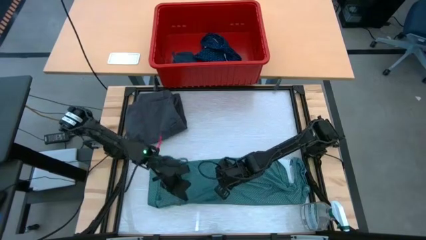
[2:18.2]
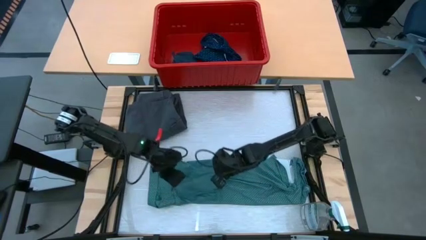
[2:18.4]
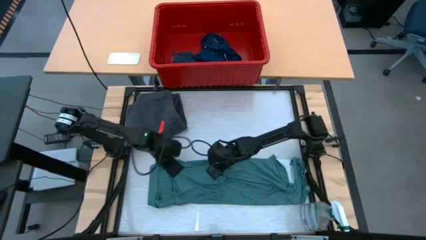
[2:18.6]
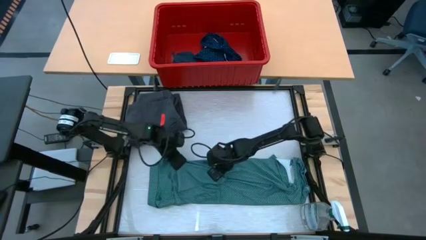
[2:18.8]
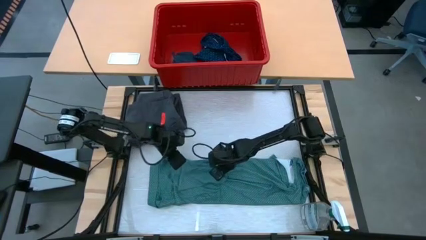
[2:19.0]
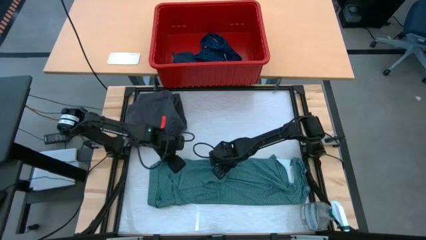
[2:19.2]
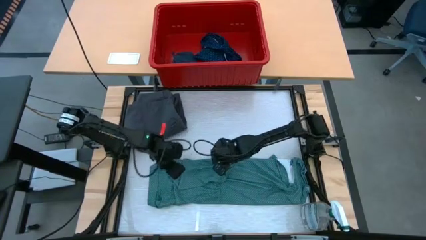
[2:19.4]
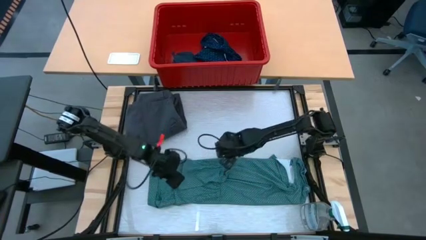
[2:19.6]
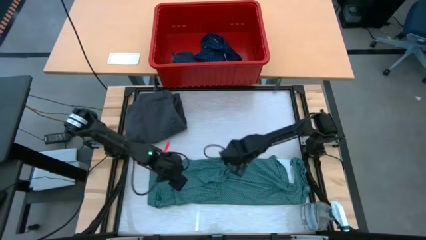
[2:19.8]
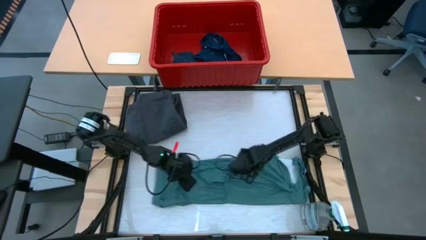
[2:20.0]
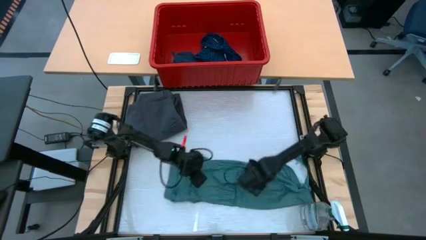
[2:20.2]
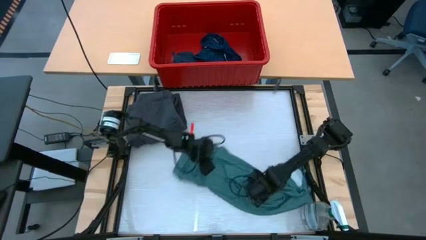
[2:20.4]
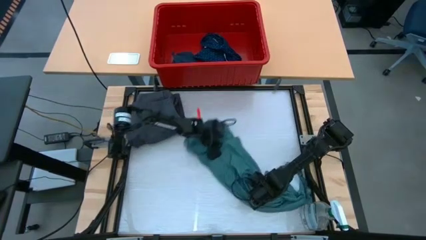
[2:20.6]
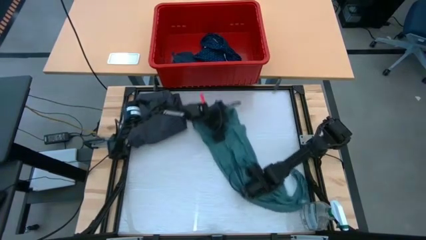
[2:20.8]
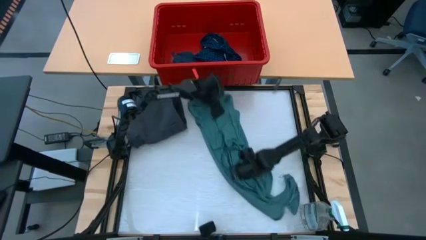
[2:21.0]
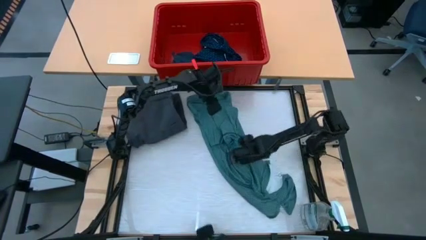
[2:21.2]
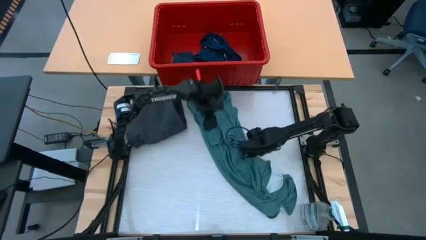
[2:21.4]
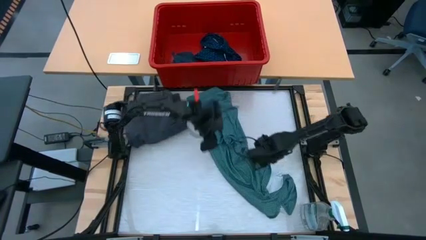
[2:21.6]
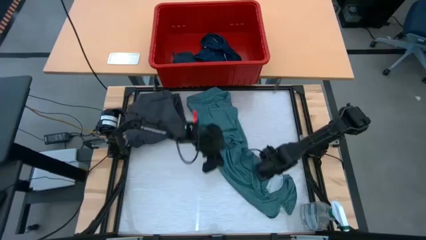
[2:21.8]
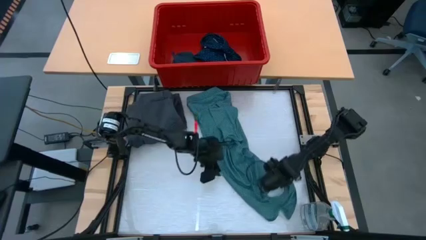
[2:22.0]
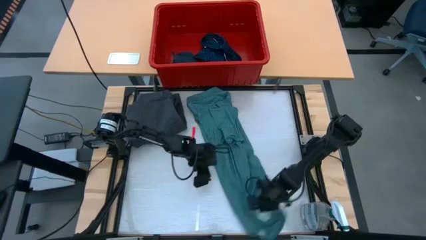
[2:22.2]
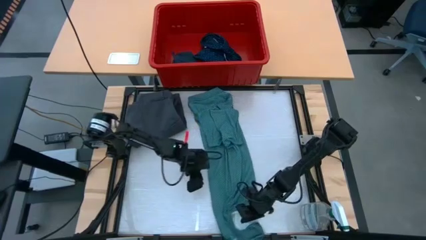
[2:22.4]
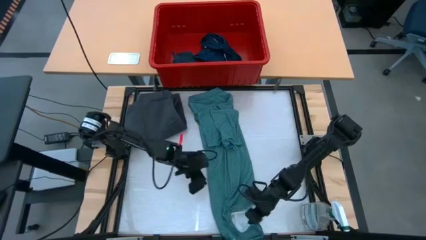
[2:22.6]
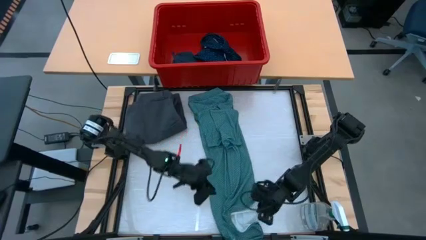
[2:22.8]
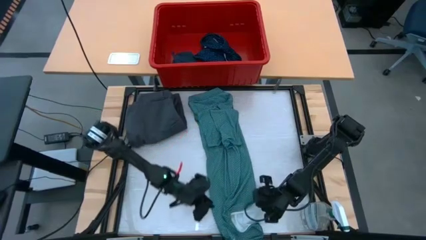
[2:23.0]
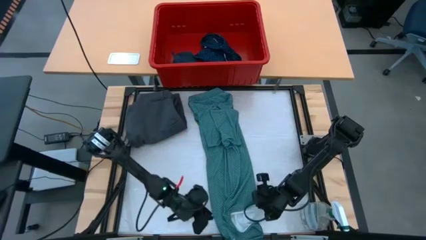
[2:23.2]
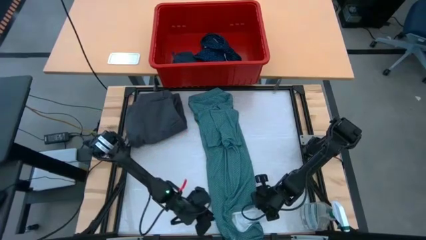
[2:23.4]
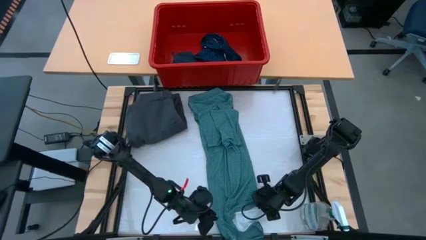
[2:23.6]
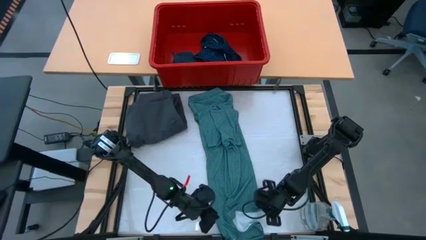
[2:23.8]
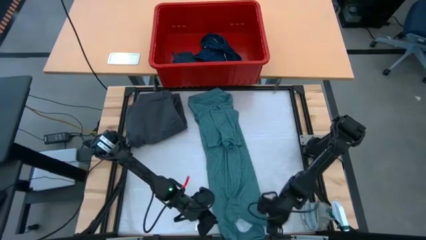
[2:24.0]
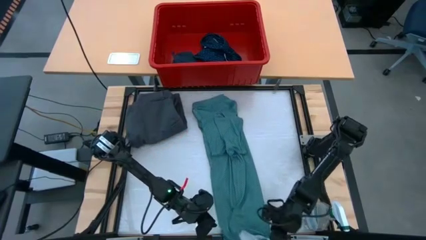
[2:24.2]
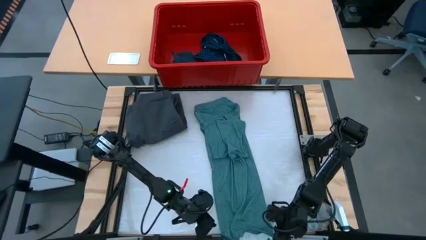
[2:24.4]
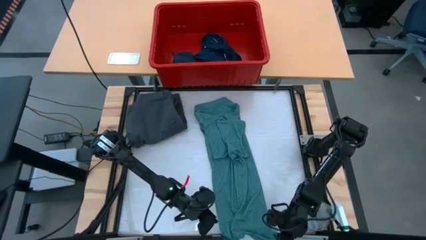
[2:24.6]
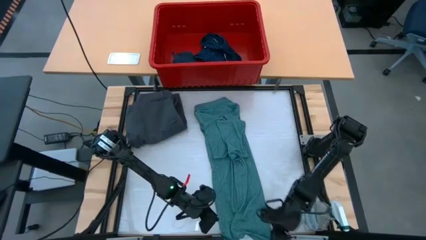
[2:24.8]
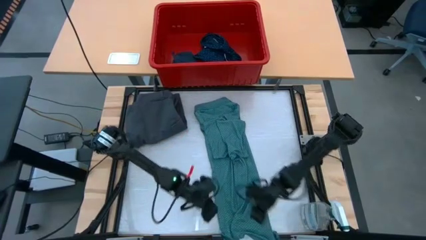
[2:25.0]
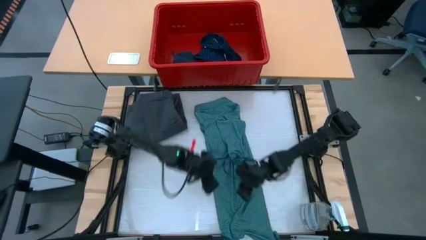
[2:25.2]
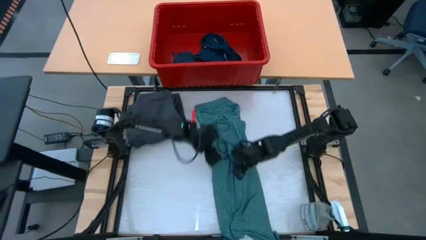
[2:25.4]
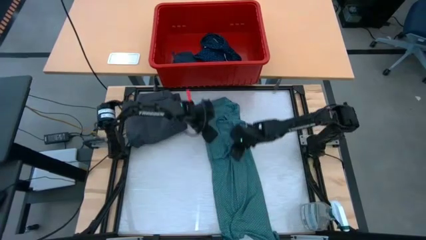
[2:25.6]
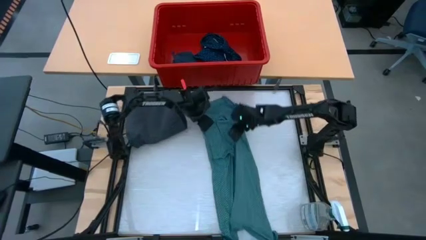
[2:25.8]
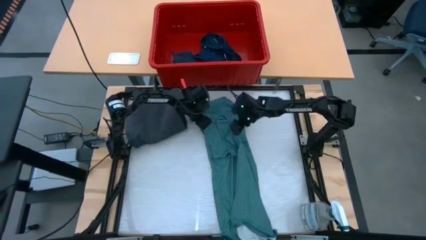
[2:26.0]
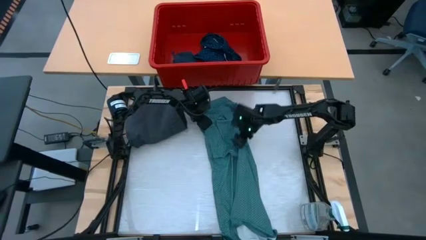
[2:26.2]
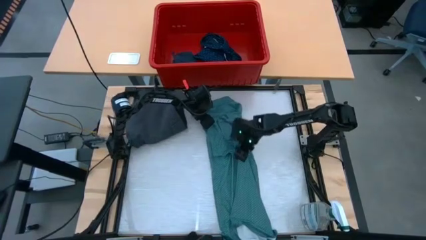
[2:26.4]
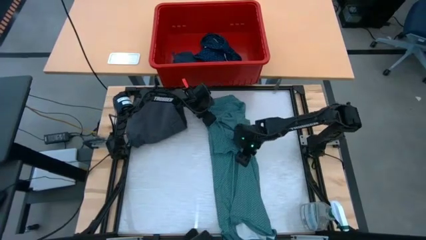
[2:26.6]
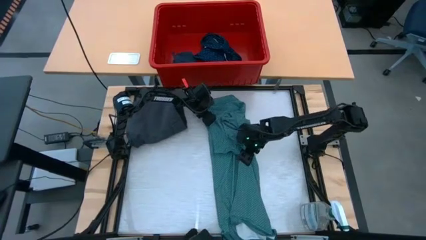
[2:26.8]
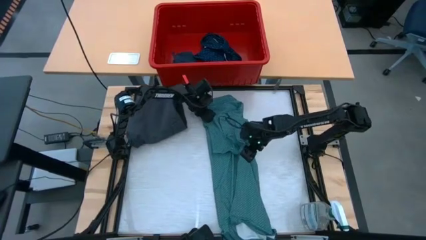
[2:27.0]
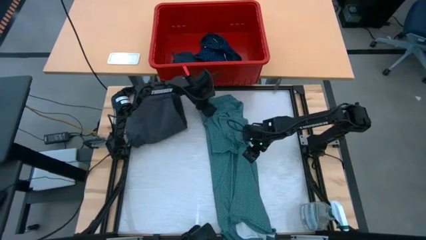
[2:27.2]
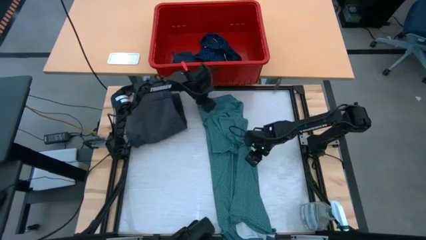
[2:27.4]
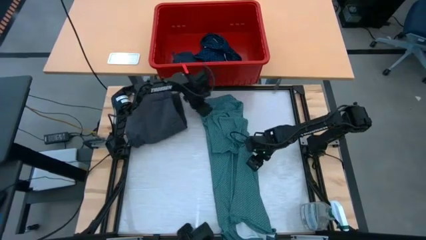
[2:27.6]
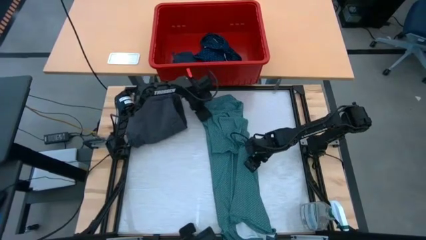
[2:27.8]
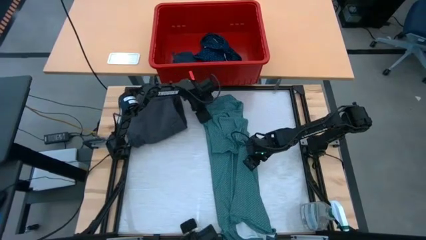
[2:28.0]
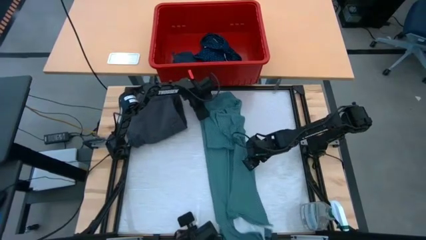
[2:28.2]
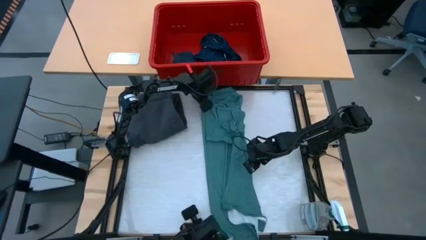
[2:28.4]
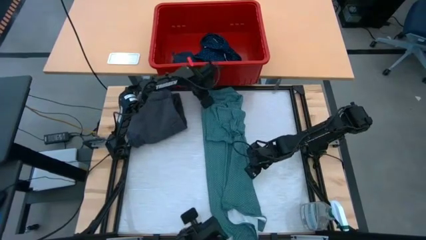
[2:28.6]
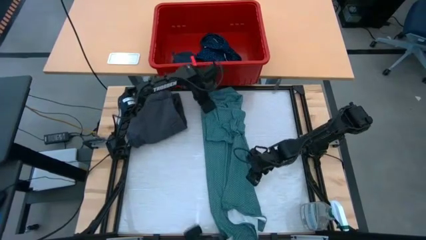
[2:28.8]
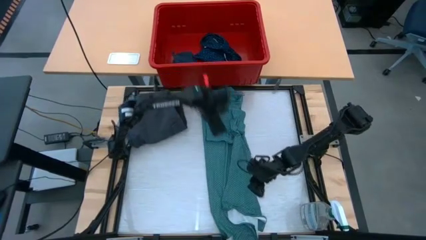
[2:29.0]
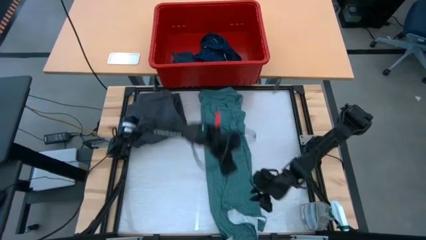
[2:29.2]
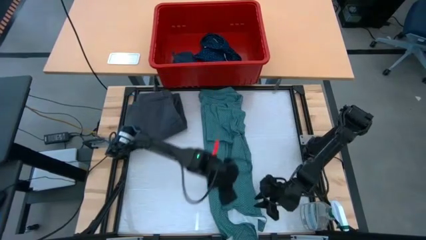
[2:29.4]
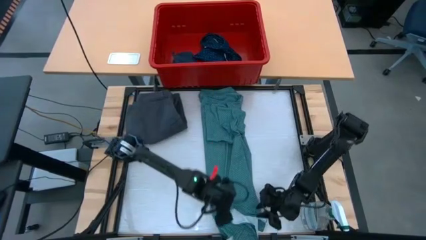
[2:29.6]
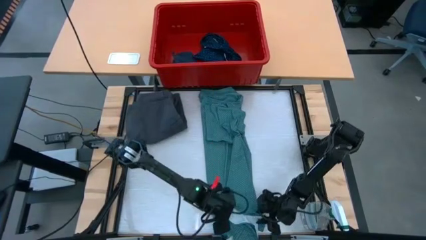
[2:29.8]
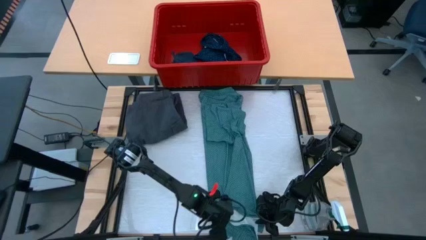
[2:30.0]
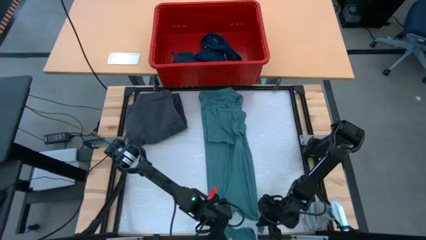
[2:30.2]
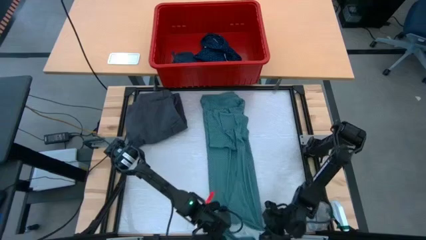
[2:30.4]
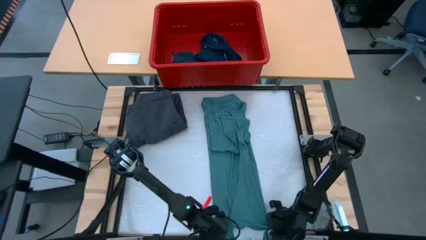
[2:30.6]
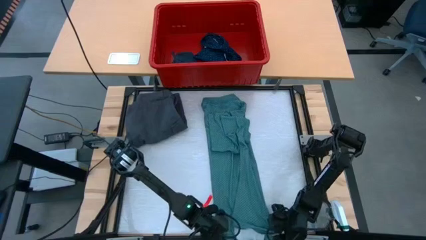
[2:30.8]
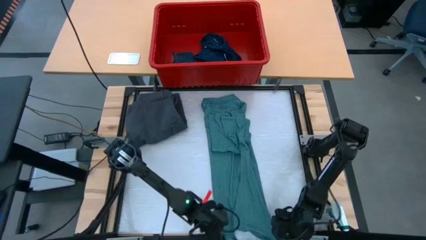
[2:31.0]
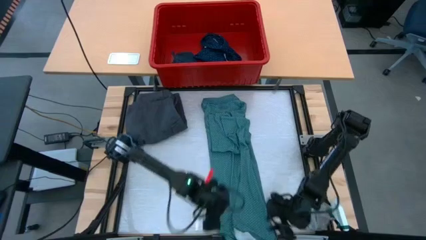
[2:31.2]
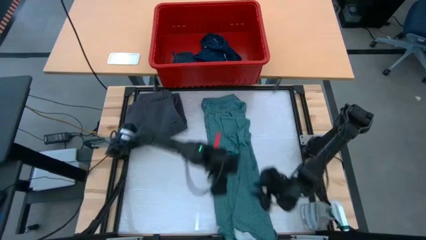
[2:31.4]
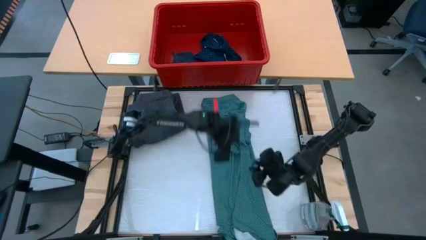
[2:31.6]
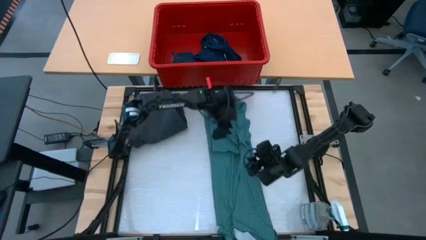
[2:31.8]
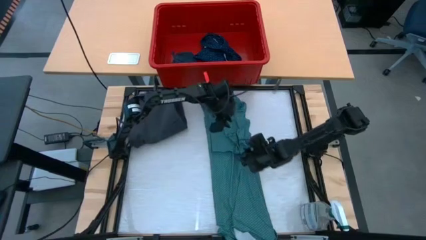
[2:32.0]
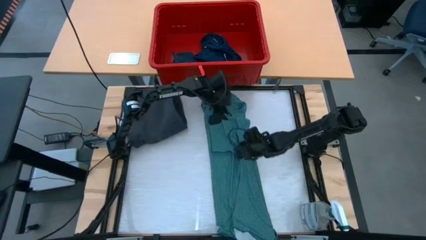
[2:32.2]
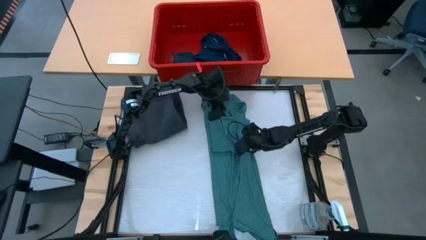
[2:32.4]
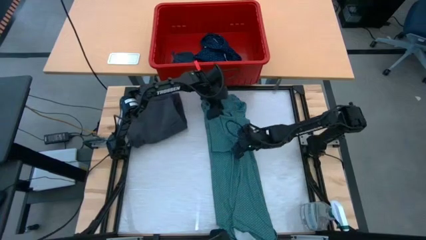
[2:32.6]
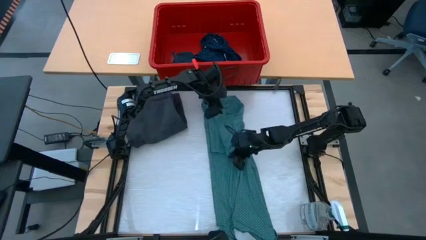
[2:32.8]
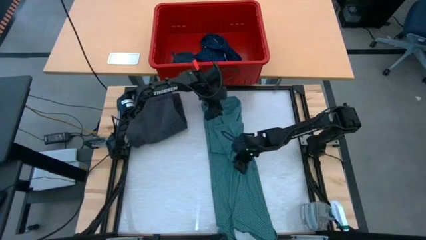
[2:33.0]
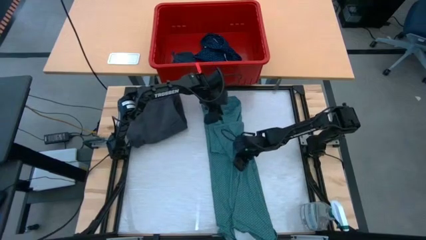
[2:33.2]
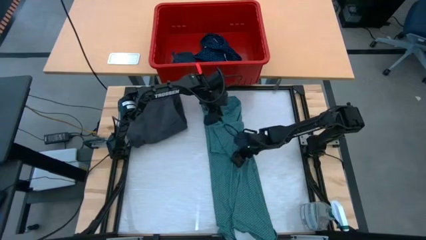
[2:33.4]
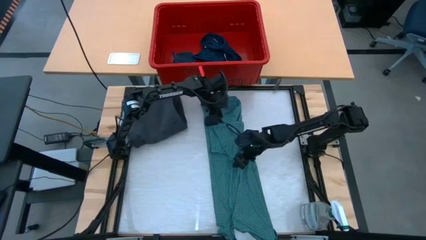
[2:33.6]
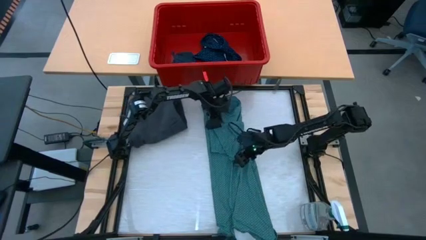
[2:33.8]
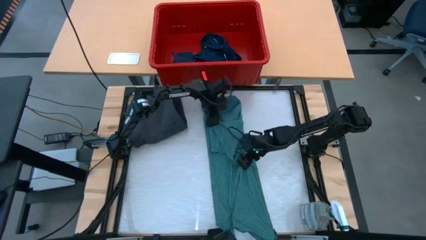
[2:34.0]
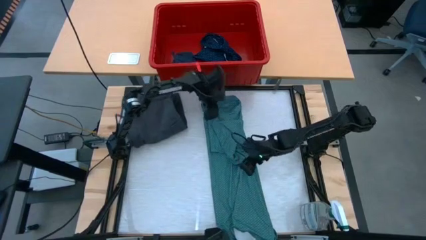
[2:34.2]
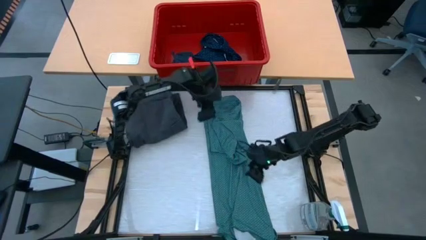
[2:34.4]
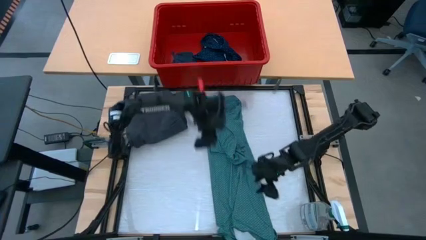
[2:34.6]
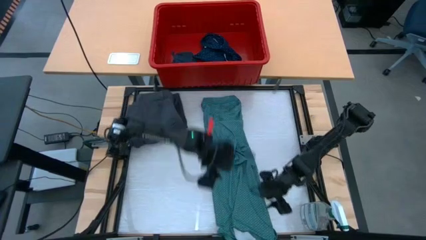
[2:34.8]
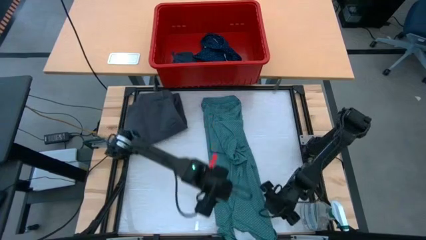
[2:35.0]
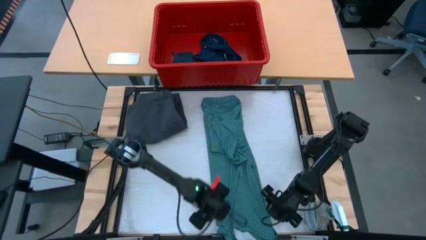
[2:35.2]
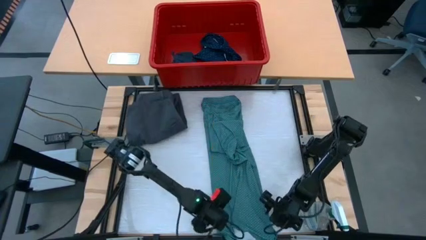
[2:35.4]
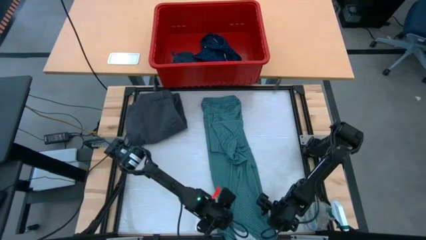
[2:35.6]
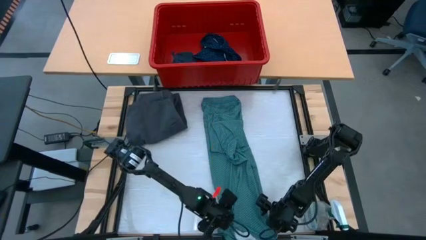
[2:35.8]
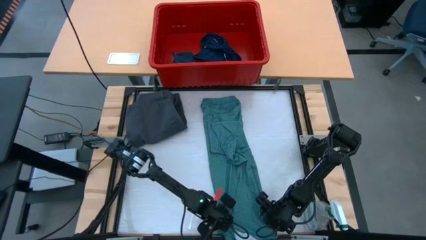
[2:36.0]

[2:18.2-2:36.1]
Task: Fold laundry
Fold the dark green polo
